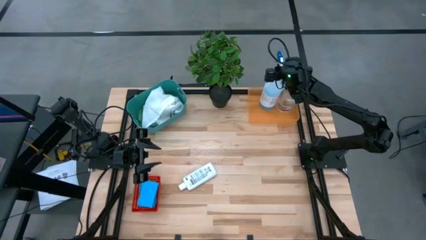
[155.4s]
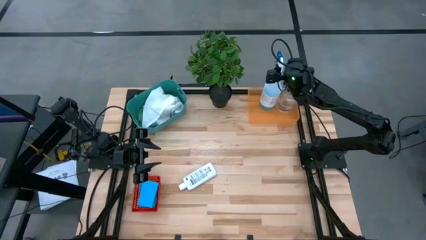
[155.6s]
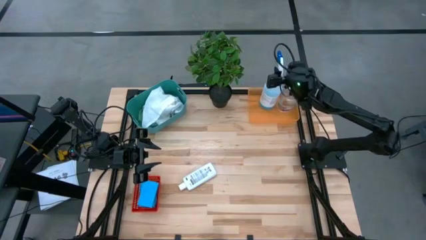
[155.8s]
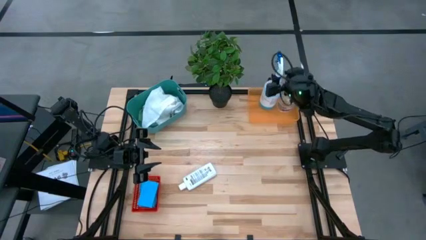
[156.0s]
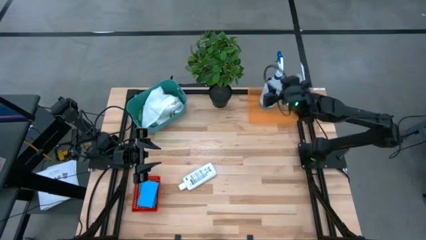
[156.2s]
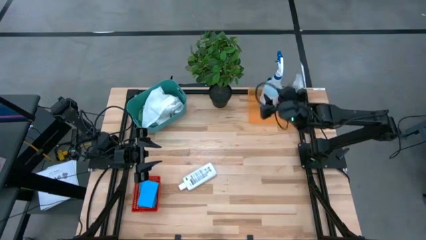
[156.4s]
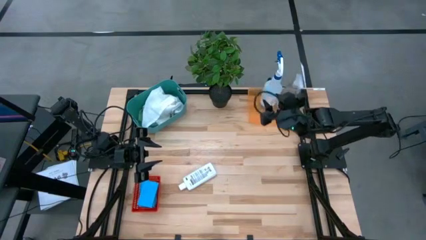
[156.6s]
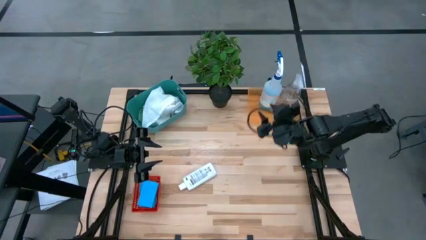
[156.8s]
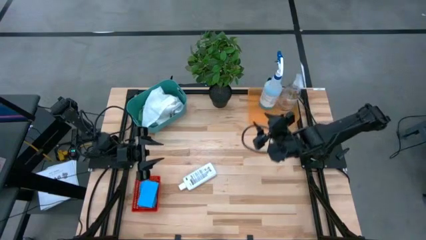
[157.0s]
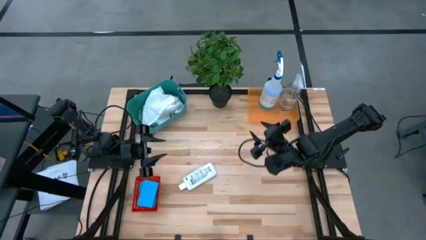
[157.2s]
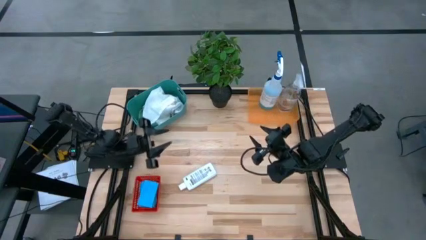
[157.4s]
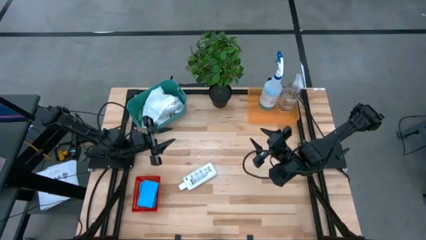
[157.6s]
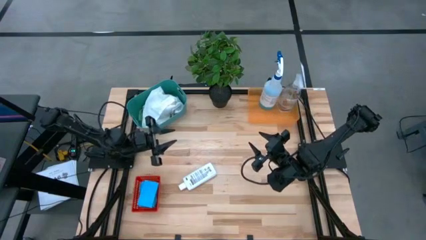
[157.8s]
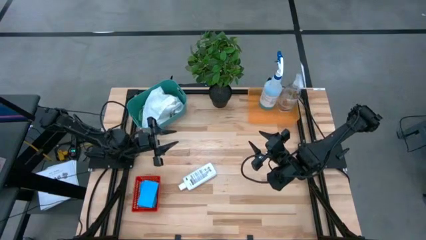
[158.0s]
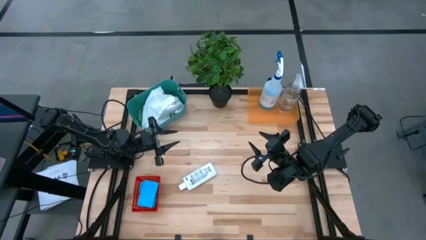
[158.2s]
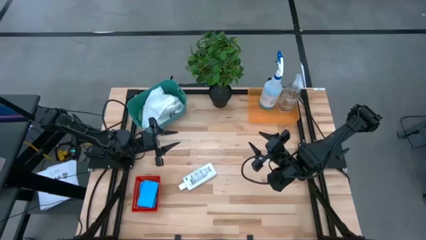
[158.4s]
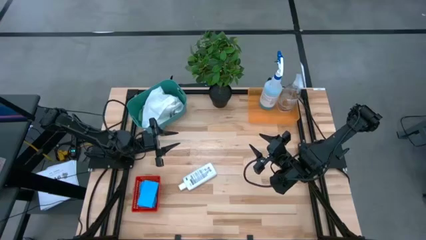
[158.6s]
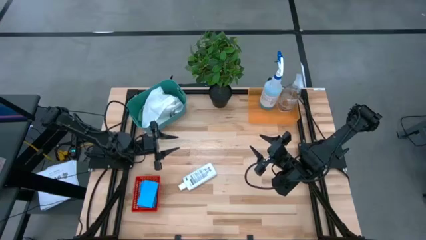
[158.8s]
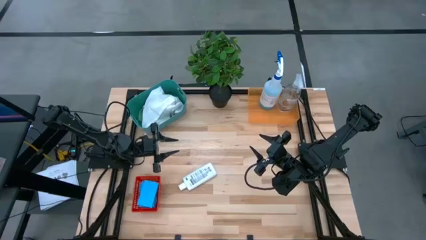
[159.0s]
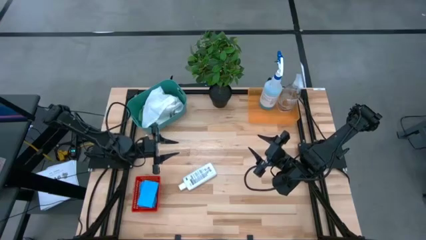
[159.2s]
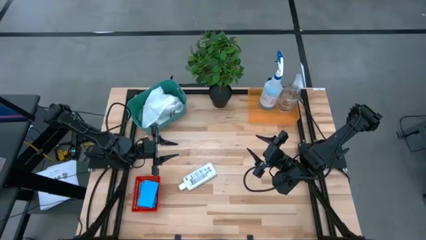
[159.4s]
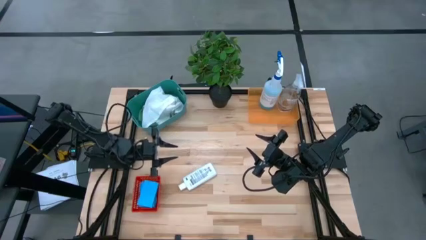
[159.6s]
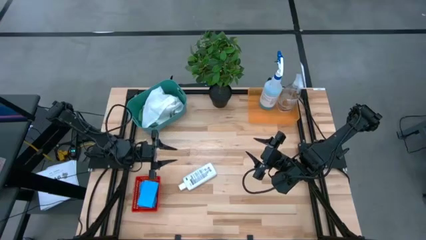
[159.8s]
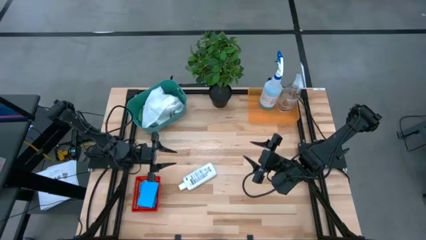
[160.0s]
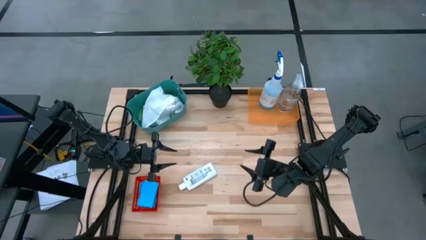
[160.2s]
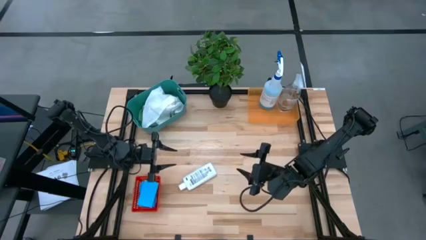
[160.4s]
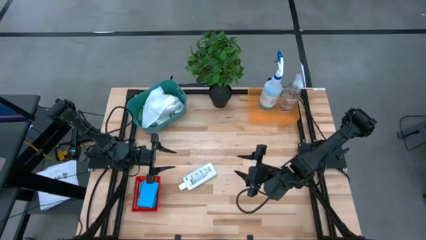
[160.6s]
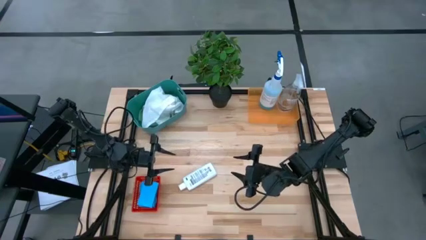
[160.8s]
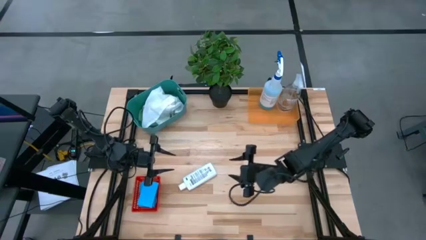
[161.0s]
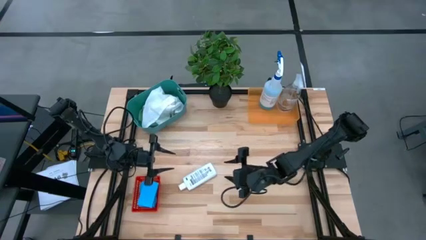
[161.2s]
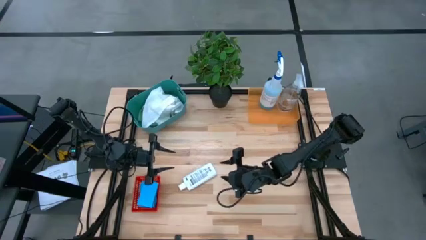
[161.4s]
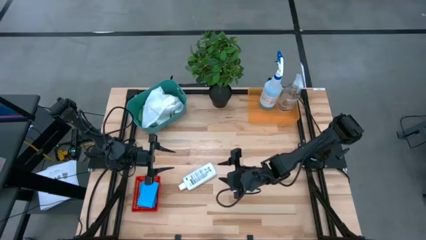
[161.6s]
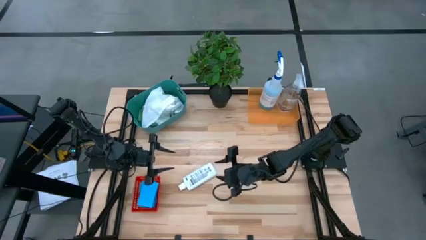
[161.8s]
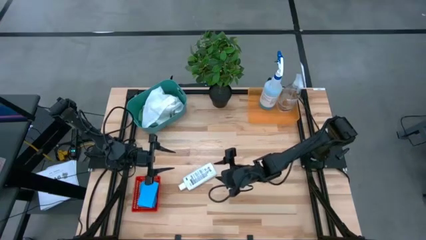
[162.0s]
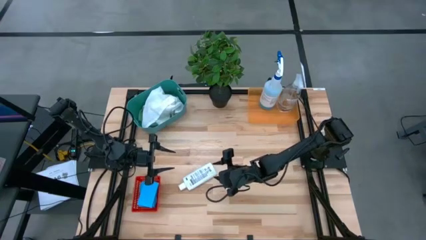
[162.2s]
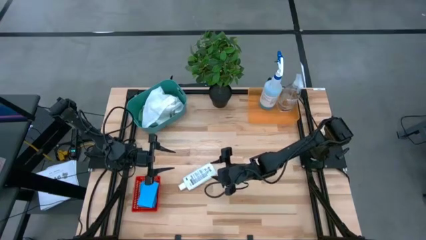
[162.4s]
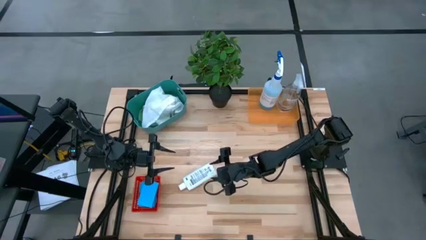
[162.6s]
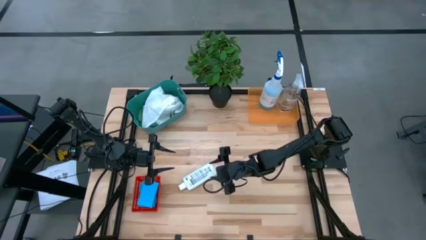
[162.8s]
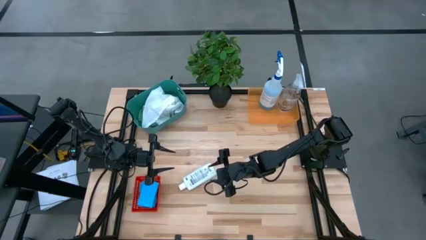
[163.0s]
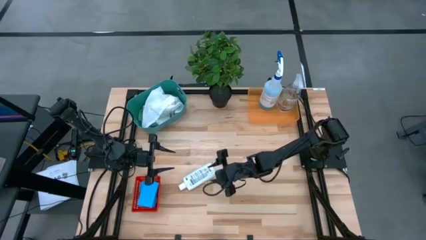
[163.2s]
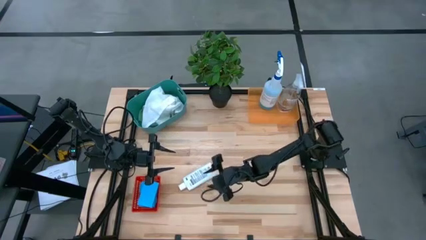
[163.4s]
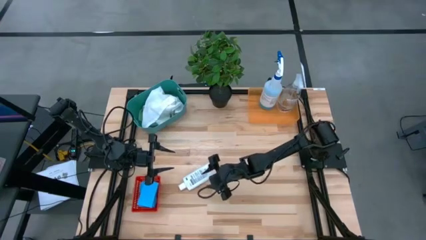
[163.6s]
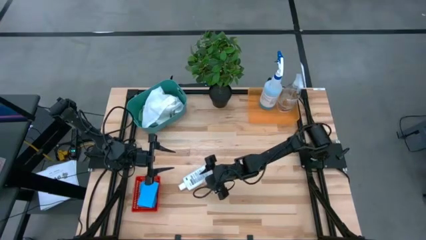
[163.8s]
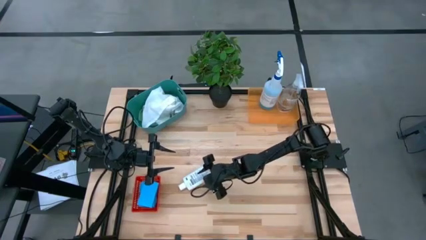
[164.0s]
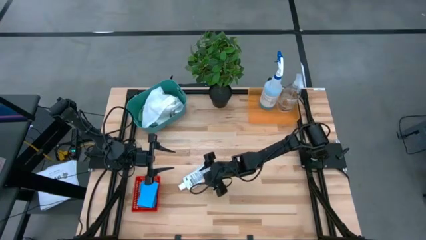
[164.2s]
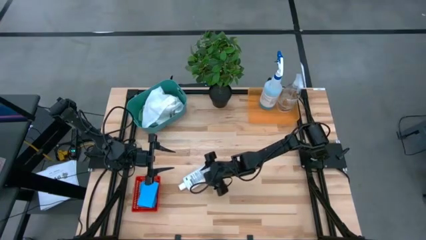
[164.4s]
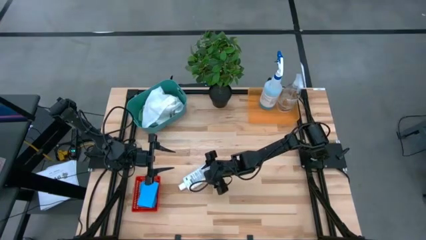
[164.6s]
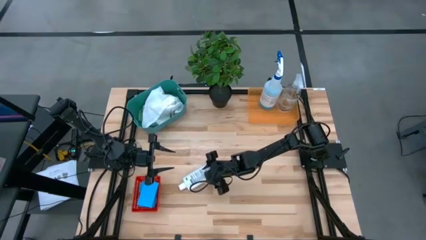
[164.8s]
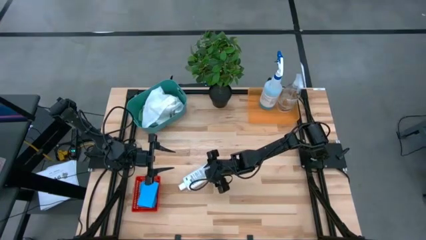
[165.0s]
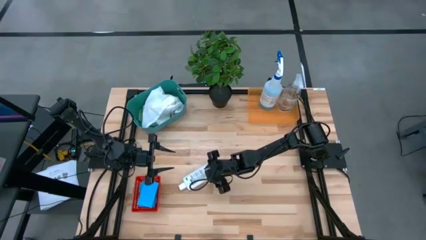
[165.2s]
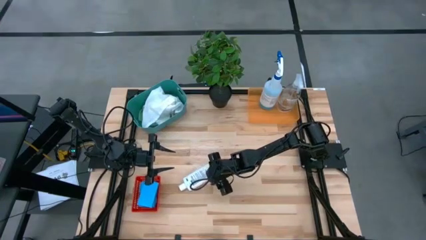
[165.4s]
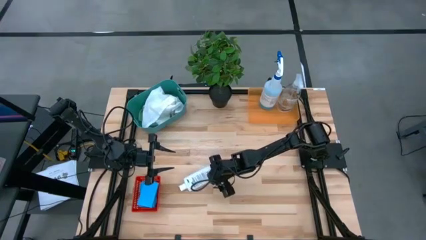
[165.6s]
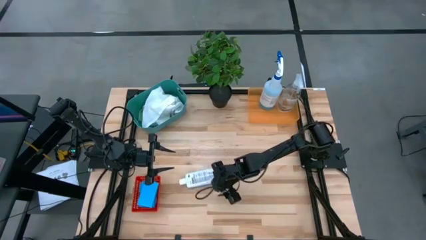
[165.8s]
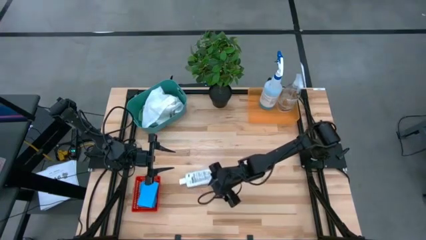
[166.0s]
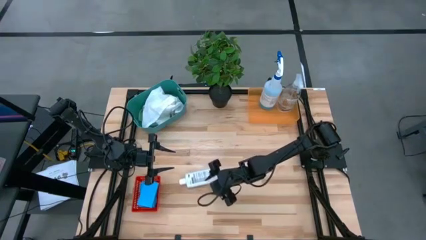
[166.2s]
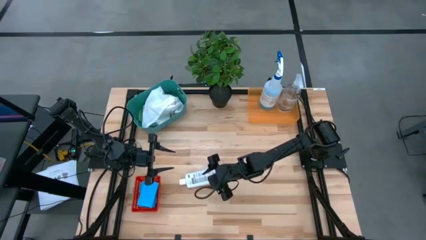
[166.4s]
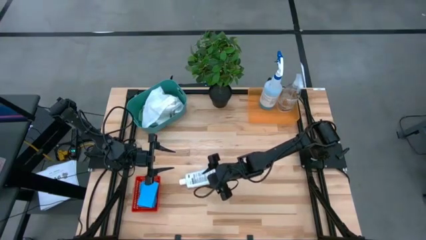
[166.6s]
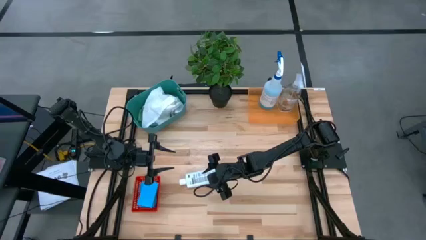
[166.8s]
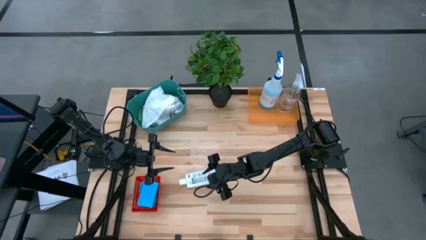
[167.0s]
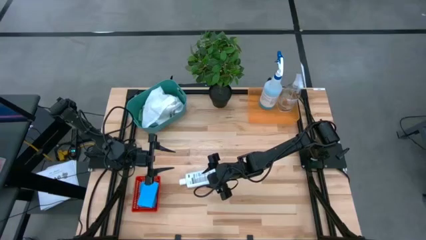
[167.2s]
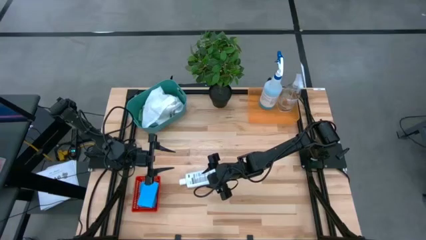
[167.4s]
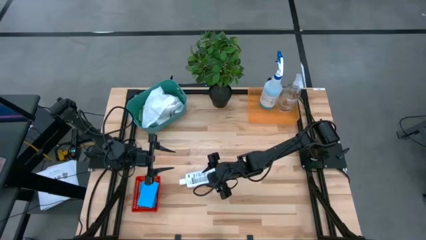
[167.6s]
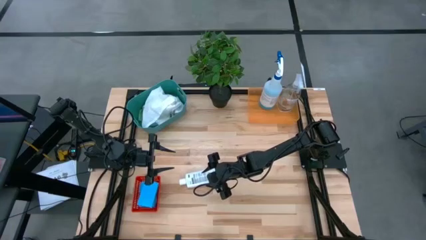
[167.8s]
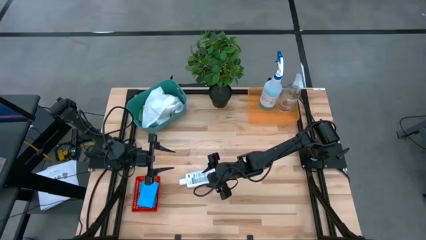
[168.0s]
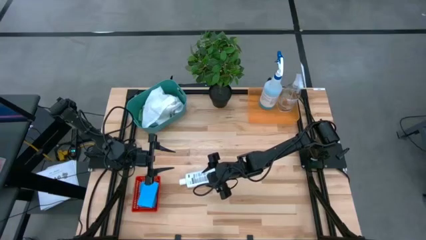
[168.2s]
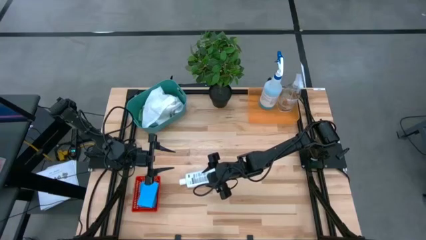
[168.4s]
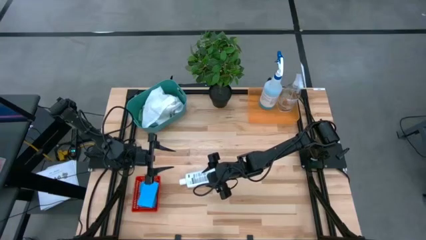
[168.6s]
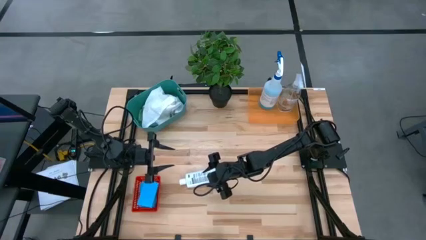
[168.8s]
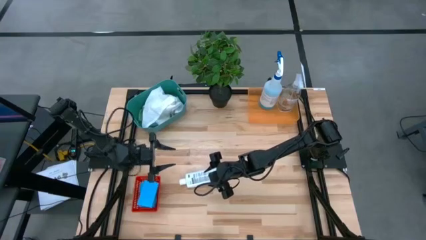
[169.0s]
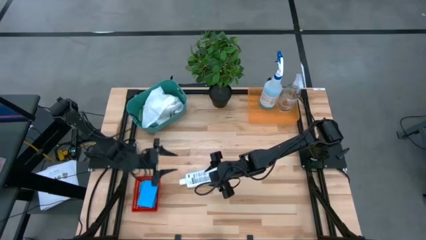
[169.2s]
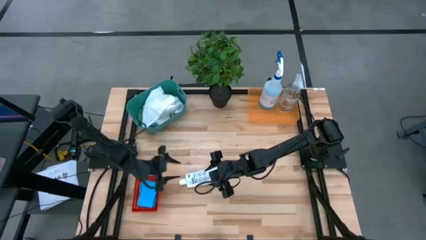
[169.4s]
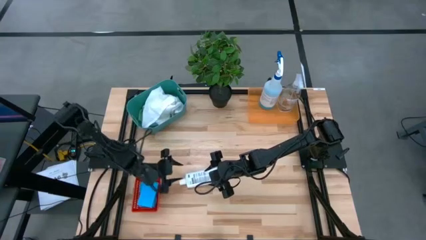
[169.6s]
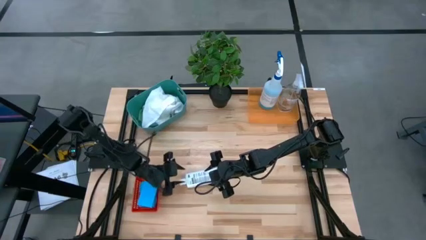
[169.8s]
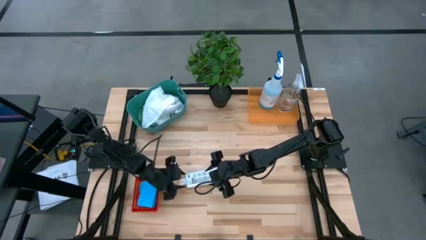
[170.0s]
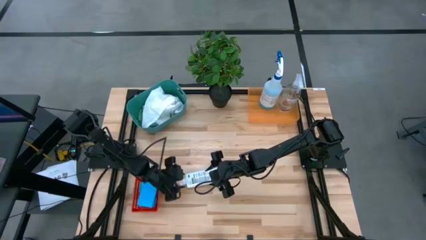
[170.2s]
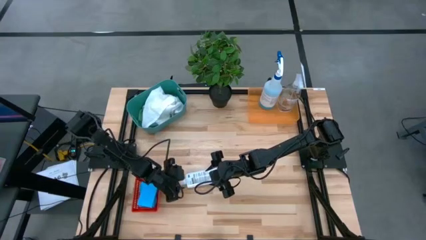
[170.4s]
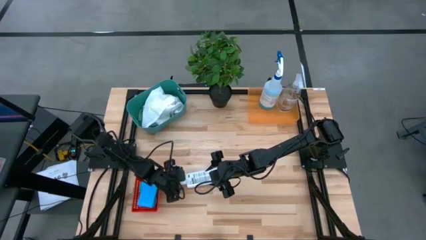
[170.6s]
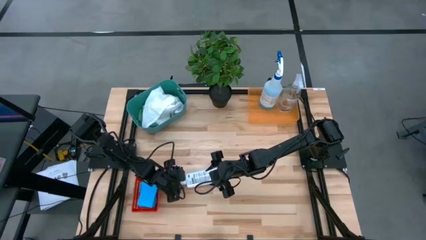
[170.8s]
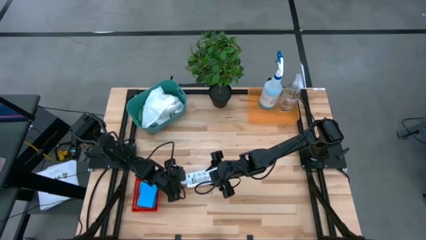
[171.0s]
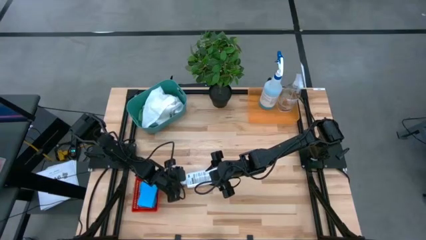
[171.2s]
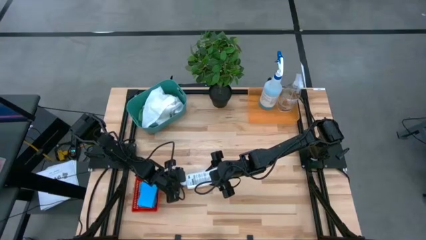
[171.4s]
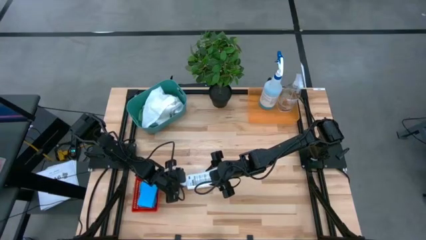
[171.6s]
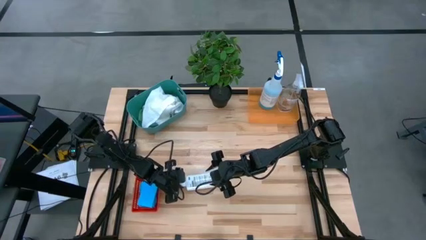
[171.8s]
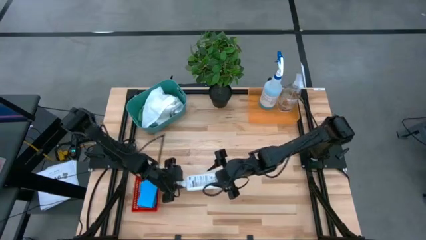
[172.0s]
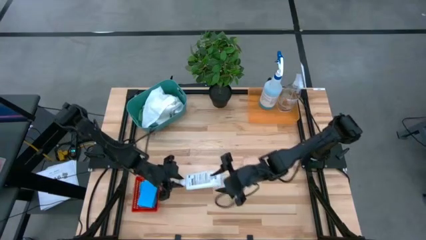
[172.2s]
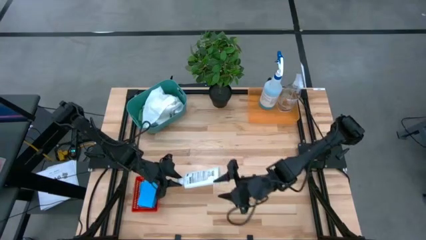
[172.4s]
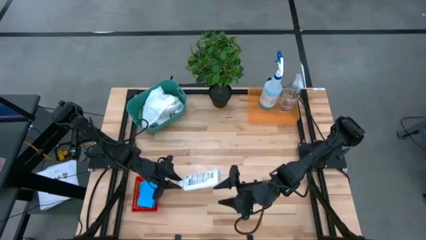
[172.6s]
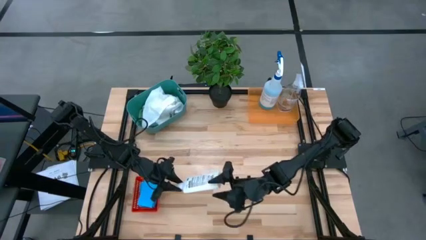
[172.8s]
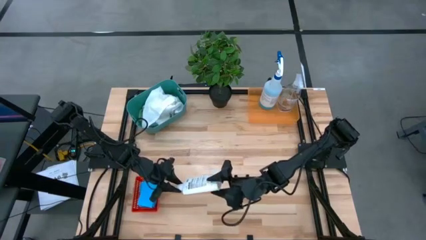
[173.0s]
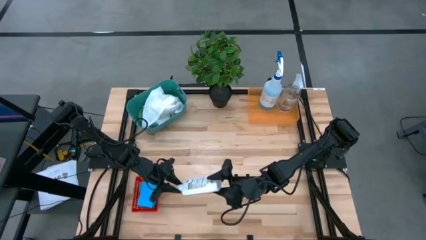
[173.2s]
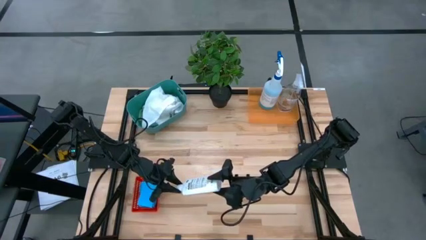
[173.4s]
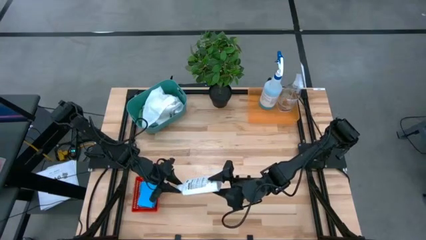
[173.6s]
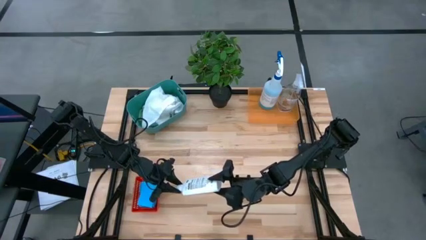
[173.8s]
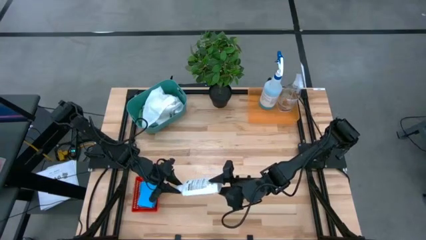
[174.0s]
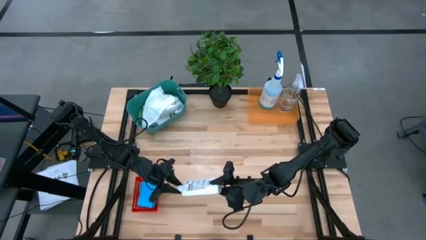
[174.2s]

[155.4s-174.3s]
Task: Pick & Place Kitchen Items
Put the clear restorer into the orange bin
